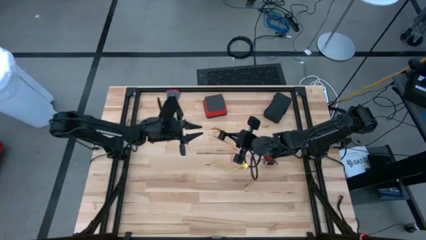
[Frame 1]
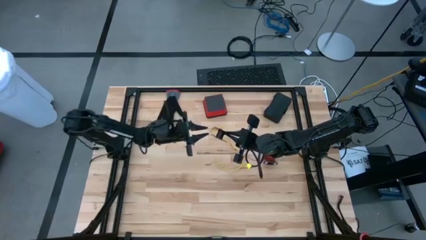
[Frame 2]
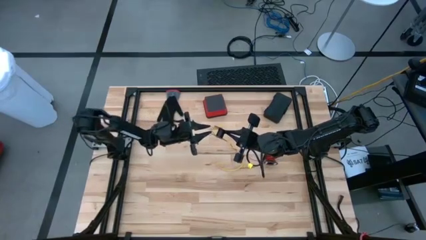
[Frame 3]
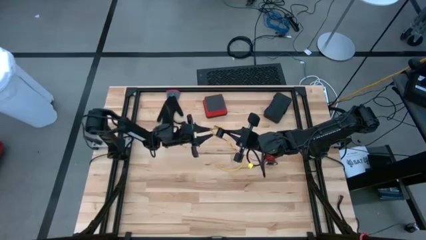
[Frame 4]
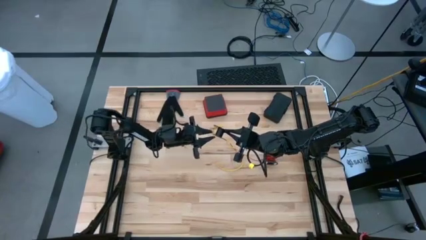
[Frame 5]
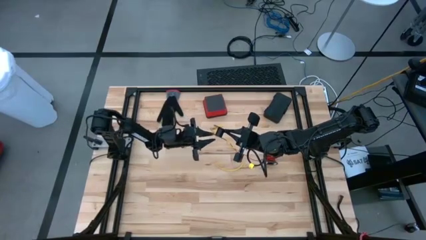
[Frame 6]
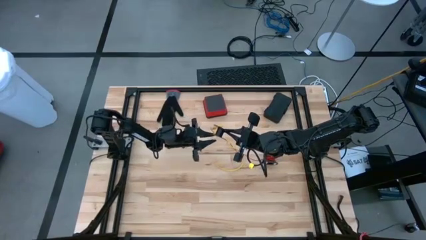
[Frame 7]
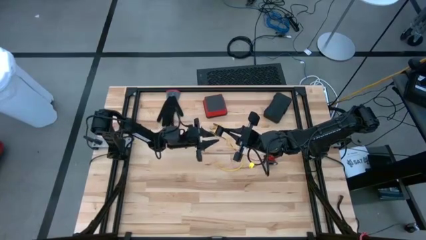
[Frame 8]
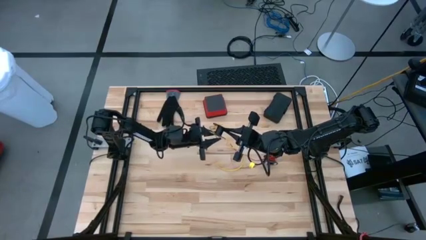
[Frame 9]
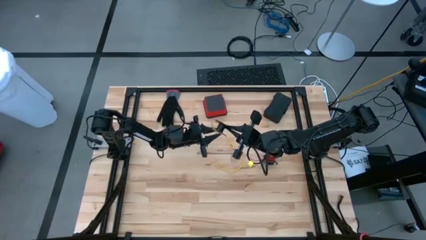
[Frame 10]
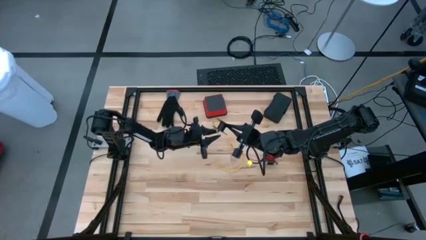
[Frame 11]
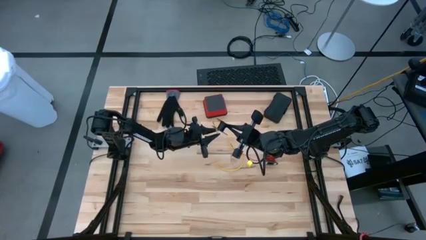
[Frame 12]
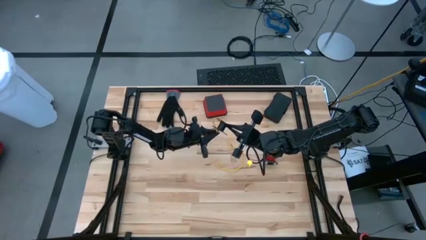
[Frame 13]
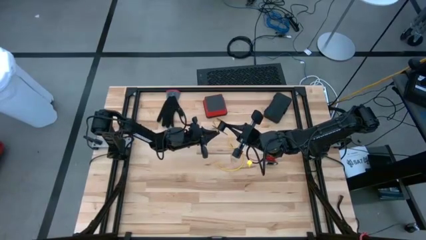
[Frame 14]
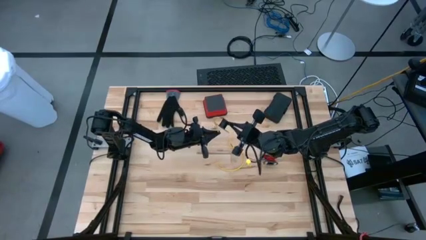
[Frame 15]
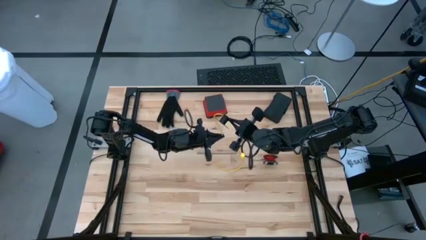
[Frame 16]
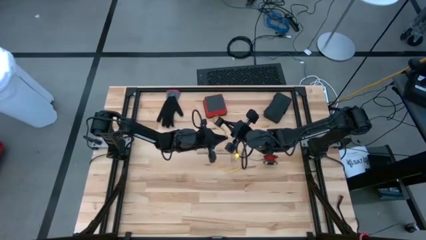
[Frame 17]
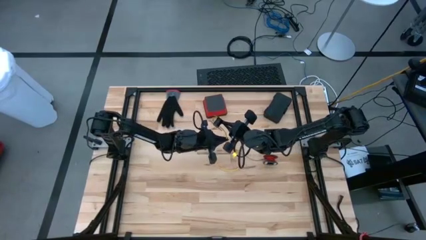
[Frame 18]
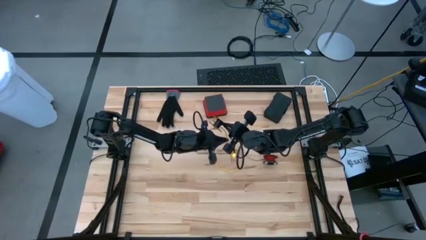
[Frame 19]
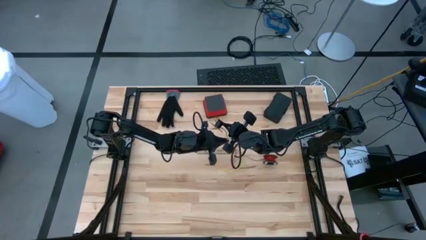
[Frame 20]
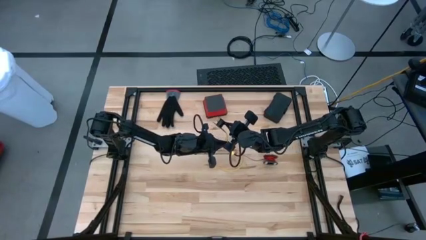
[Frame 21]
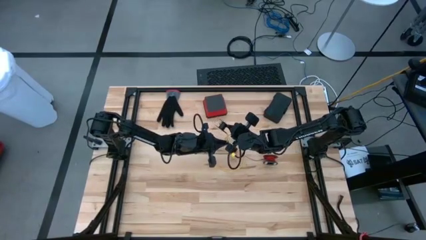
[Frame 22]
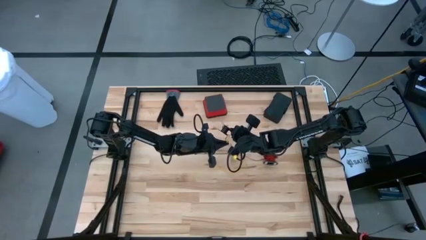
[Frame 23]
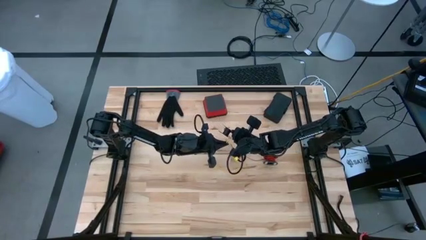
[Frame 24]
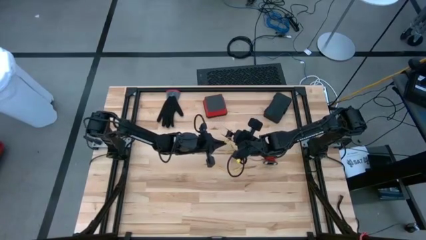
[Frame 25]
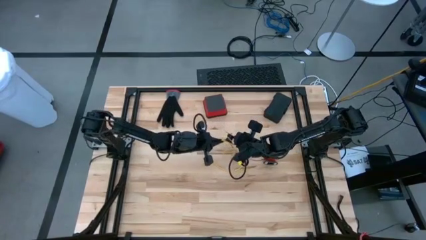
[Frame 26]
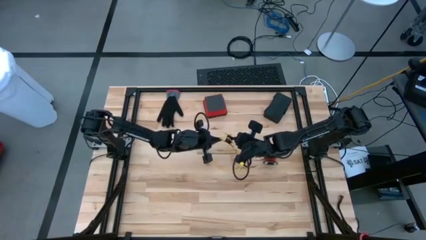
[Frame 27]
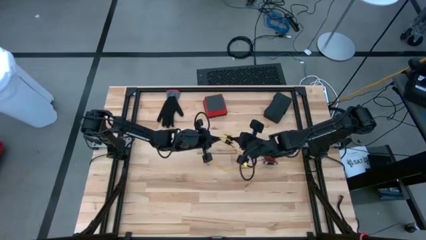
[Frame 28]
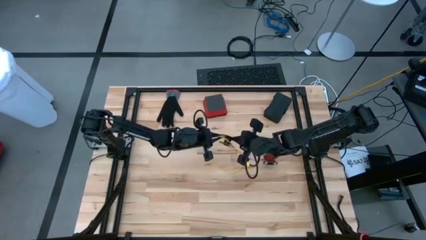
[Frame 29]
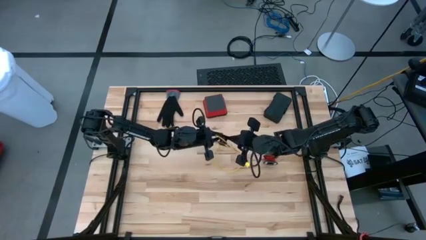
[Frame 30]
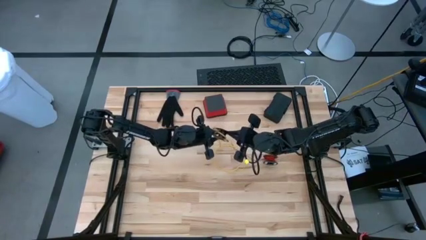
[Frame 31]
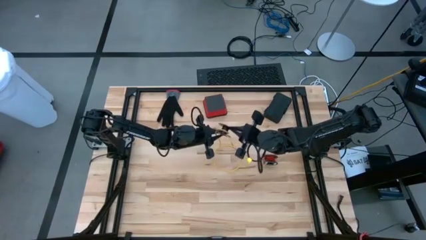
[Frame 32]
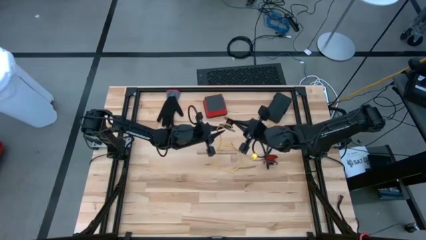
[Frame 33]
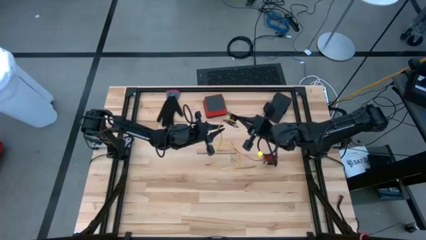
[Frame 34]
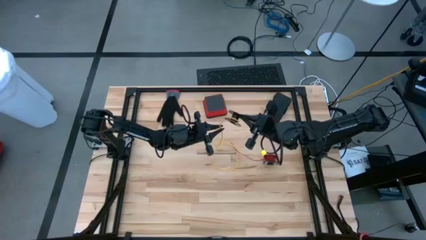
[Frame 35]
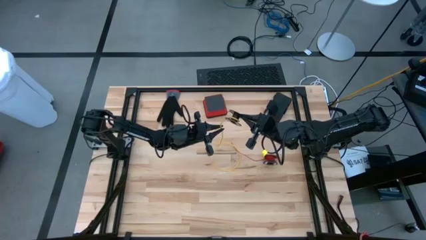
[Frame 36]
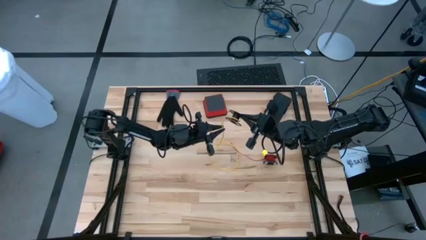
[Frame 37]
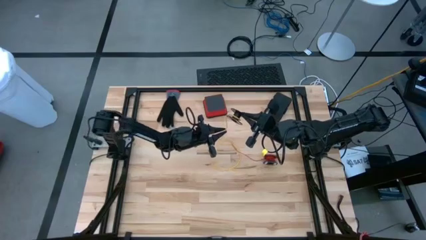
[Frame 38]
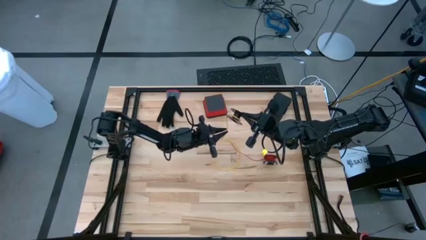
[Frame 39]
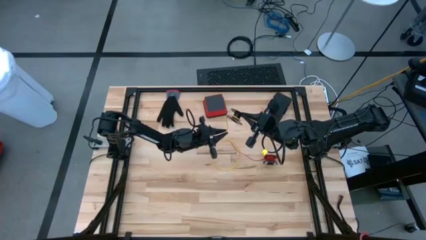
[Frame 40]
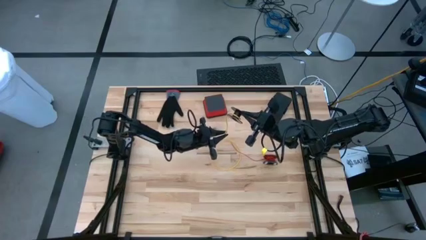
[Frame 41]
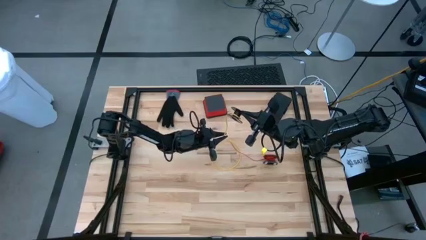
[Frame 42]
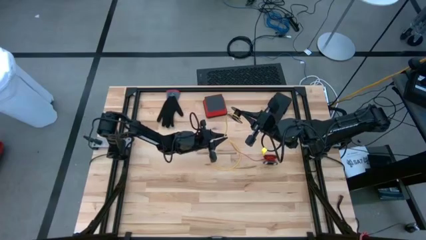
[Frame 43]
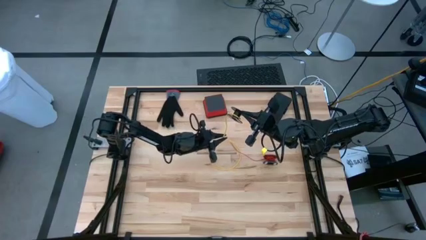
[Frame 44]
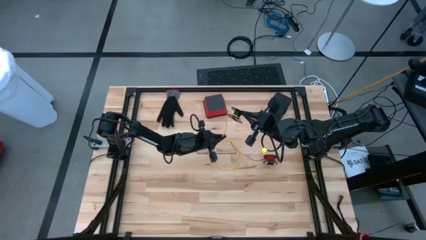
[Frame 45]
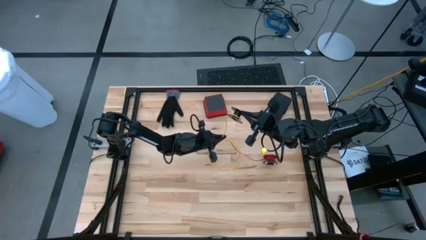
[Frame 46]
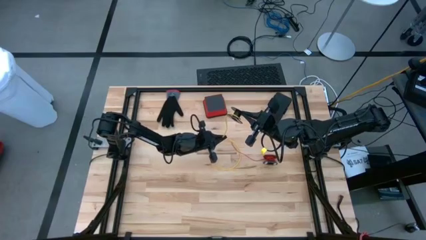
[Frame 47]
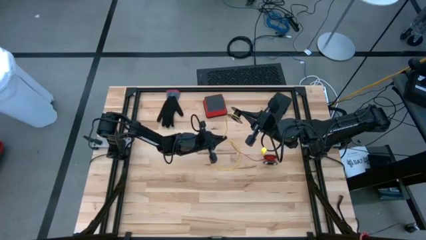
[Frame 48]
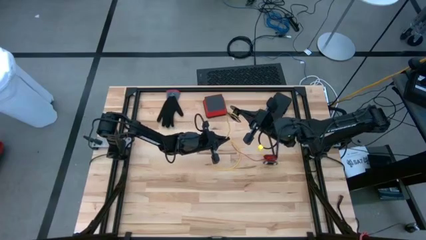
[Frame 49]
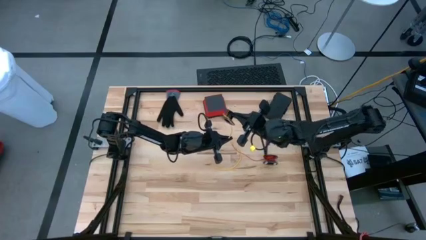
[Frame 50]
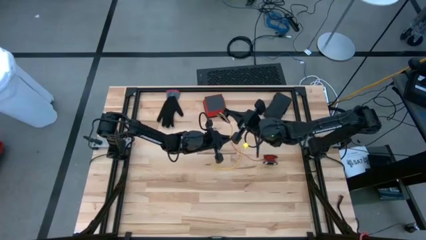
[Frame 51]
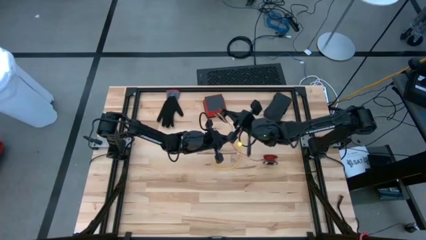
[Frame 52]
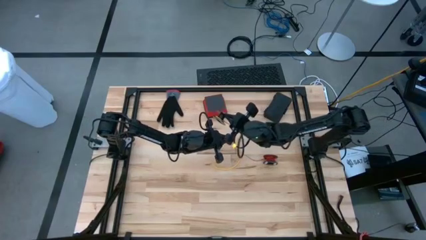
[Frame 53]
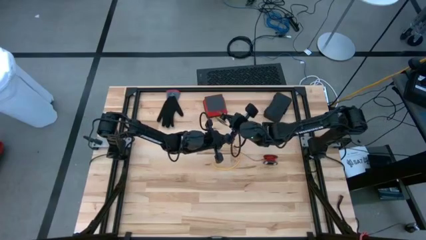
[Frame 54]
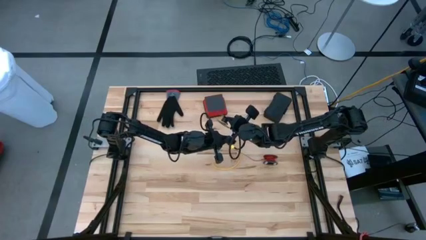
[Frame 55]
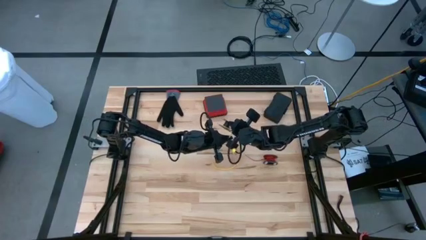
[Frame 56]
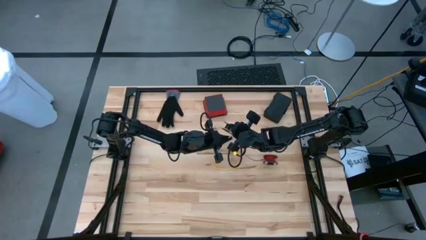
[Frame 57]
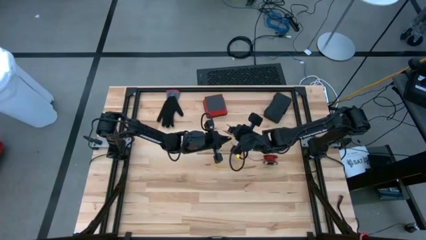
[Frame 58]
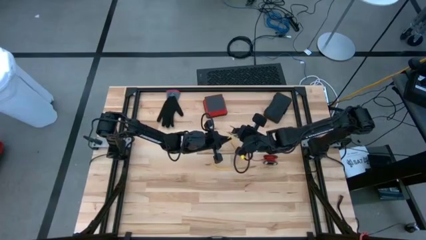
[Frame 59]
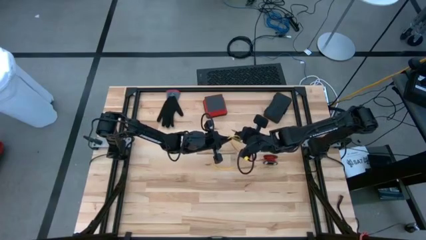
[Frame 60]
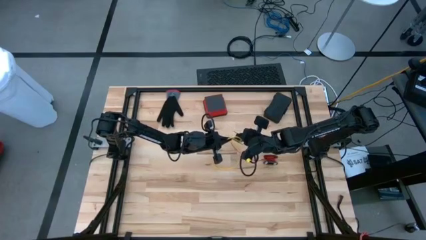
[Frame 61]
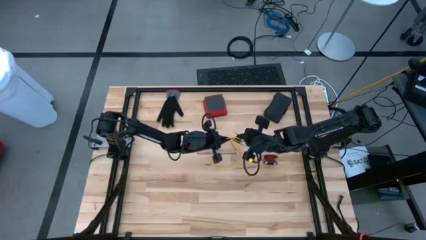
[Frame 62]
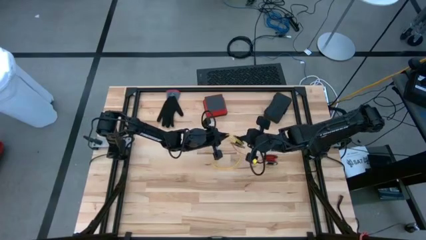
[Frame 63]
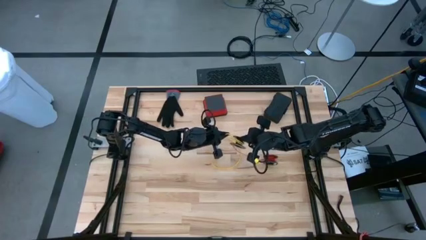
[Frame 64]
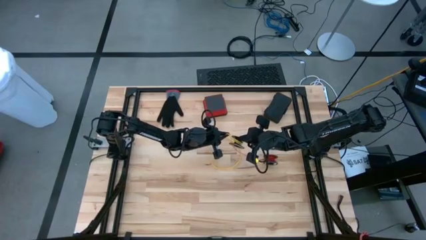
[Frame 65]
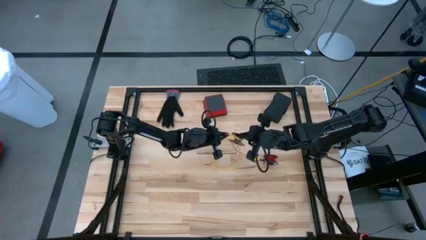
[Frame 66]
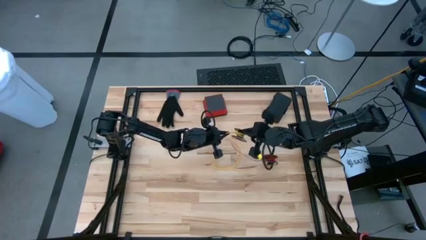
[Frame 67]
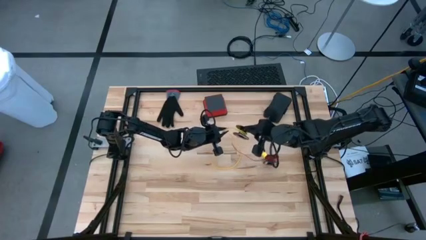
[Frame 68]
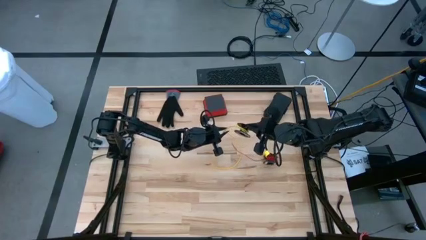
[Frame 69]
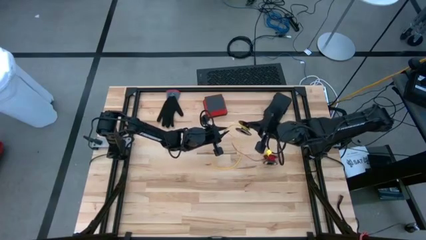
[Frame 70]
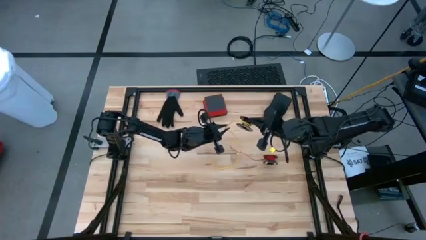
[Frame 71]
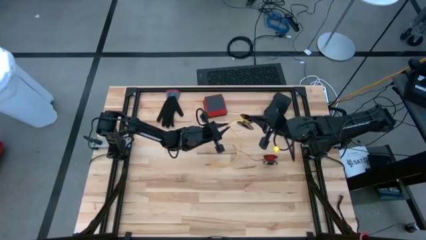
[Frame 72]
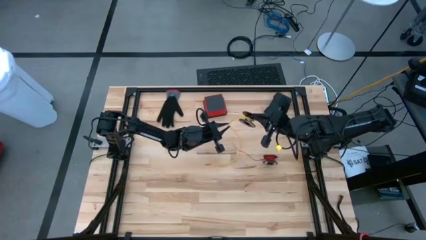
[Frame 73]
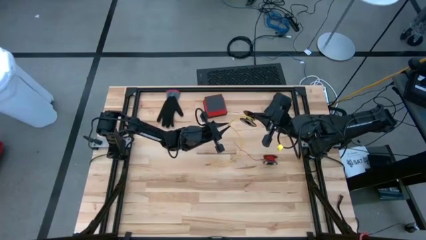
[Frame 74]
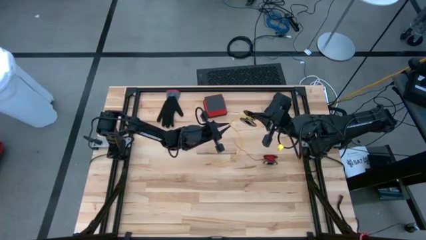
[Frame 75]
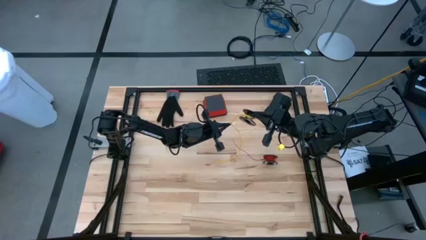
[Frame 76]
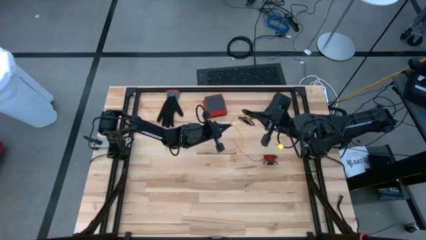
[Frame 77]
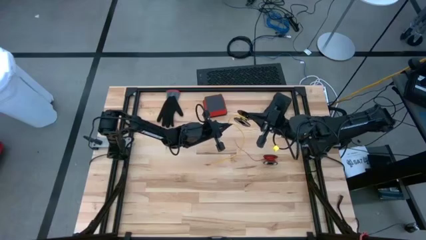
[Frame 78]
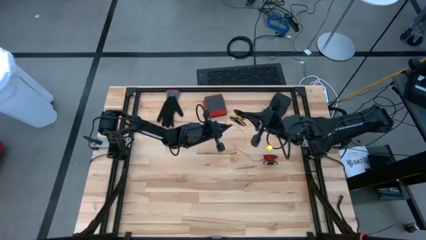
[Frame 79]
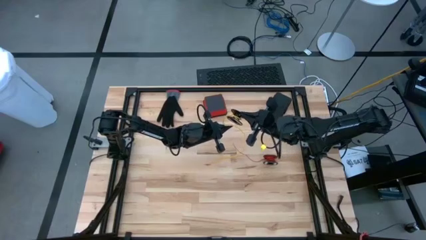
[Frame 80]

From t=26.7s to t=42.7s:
Task: Coil cords
Coil the yellow wire onto the spool

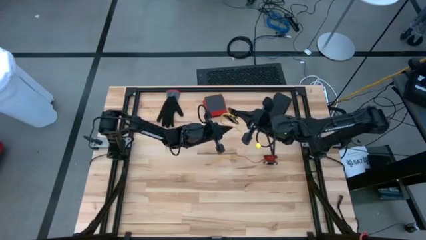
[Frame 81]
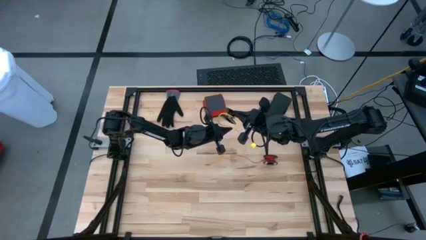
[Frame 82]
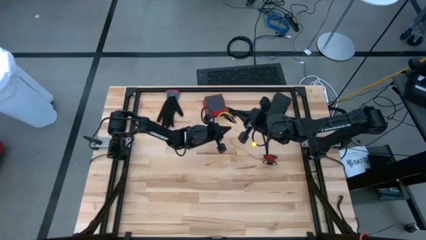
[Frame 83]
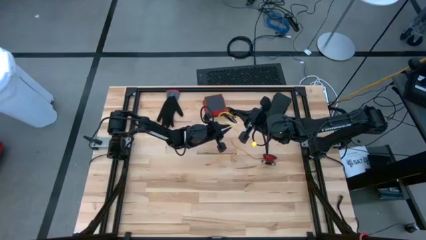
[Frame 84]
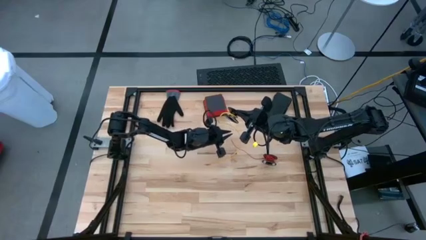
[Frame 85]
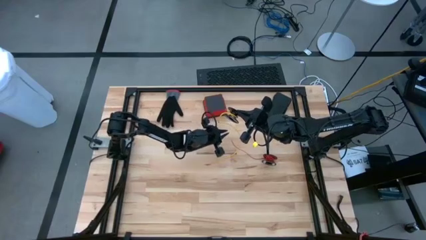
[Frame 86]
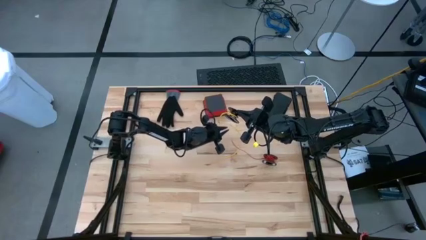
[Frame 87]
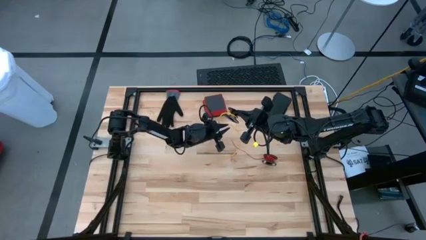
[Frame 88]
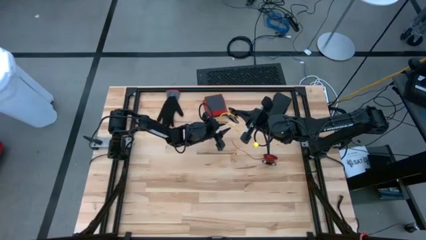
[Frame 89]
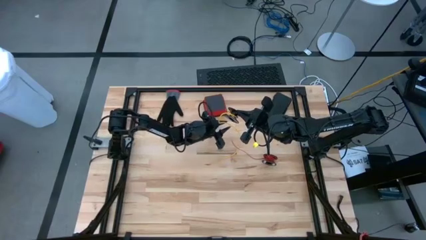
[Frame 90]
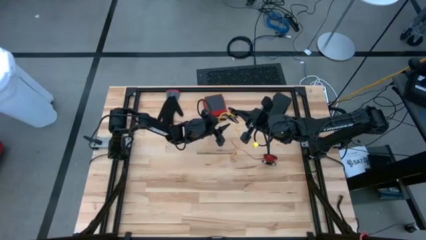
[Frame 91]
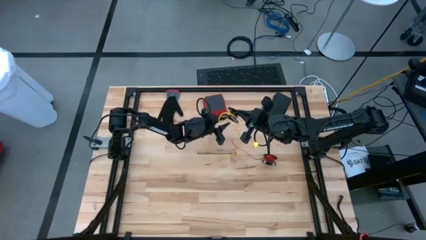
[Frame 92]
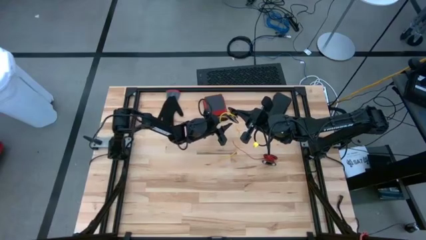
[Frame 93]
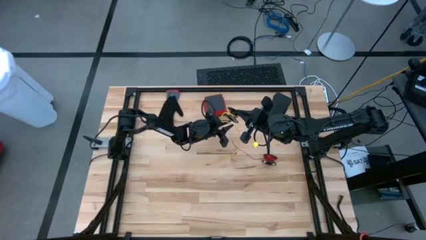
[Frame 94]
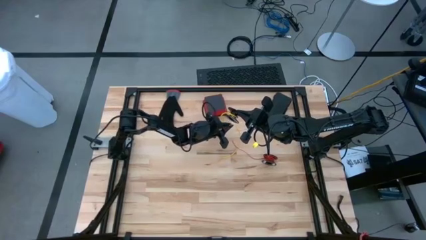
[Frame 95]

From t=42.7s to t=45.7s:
Coil the yellow wire onto the spool
